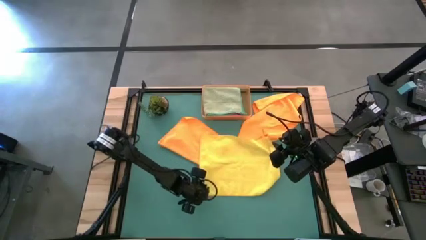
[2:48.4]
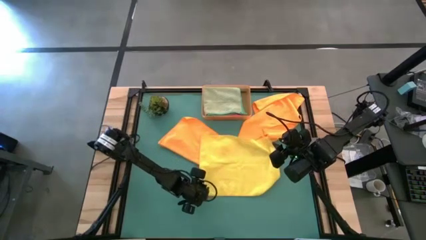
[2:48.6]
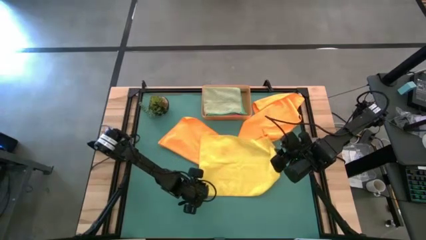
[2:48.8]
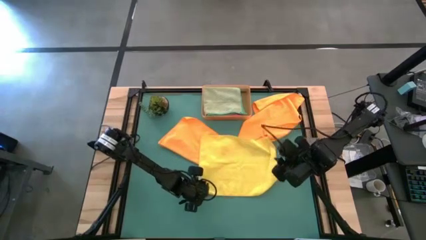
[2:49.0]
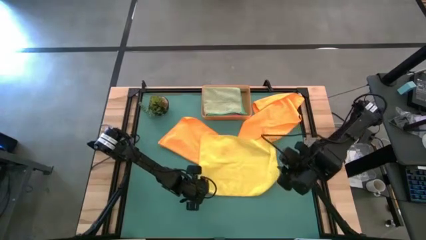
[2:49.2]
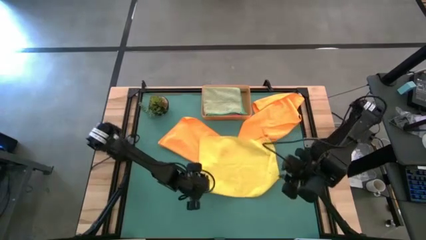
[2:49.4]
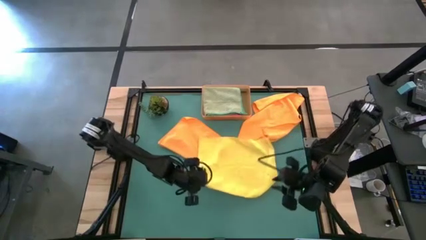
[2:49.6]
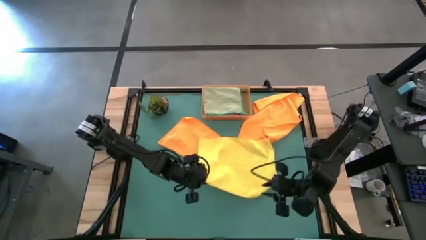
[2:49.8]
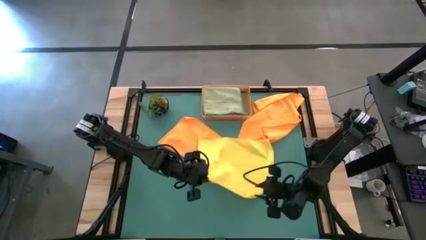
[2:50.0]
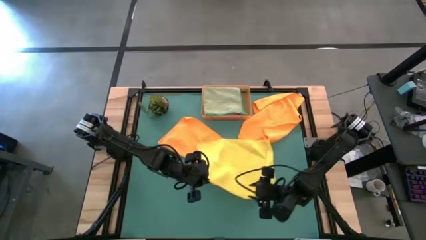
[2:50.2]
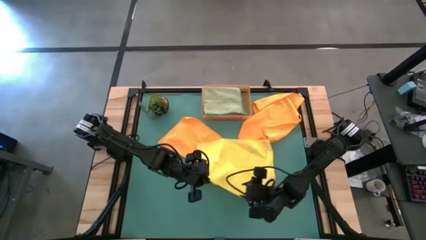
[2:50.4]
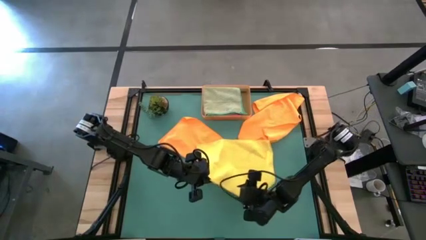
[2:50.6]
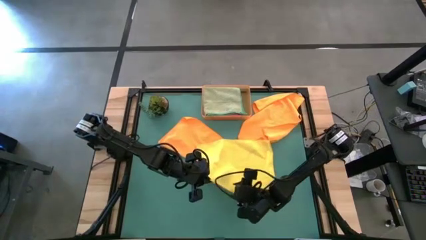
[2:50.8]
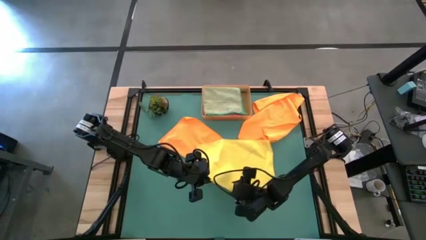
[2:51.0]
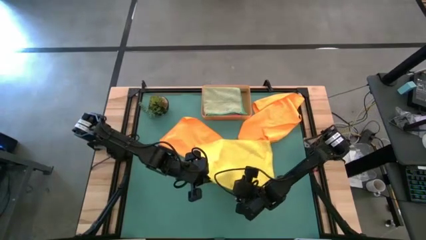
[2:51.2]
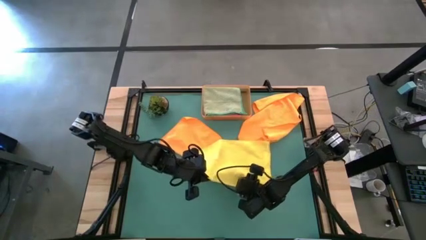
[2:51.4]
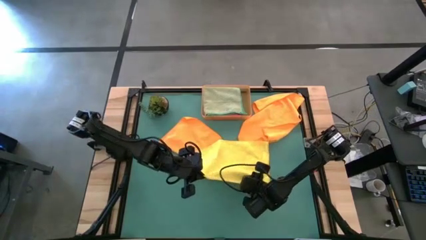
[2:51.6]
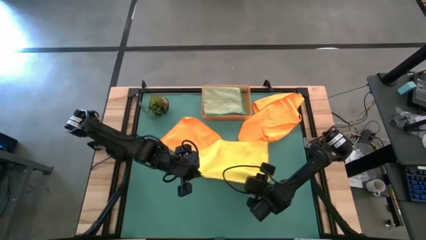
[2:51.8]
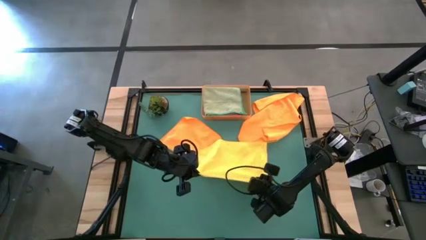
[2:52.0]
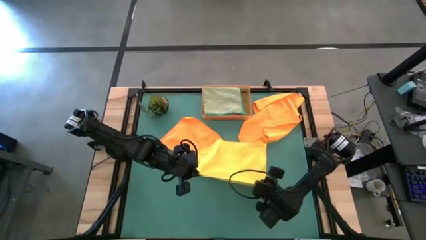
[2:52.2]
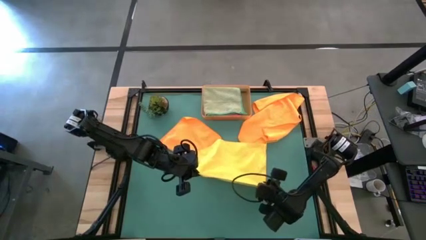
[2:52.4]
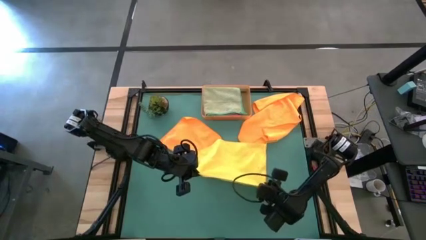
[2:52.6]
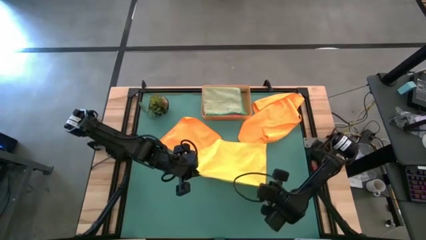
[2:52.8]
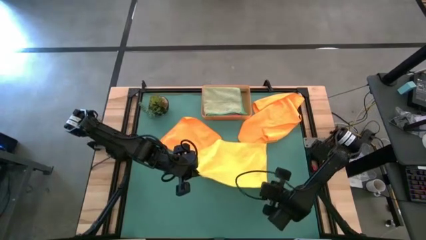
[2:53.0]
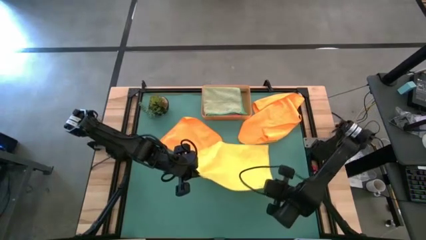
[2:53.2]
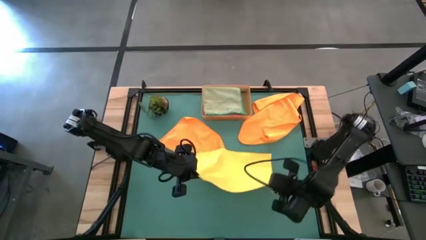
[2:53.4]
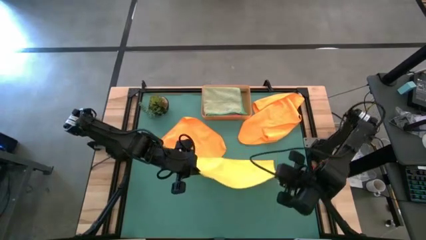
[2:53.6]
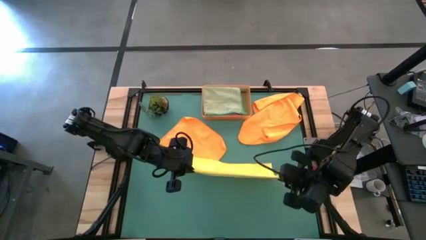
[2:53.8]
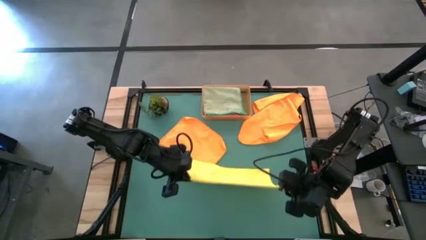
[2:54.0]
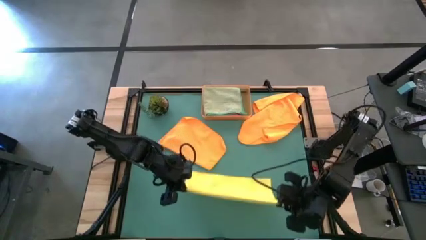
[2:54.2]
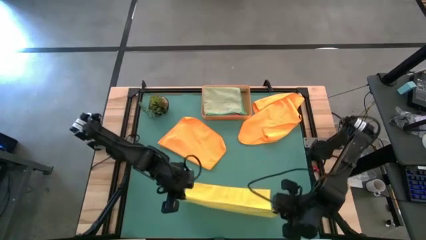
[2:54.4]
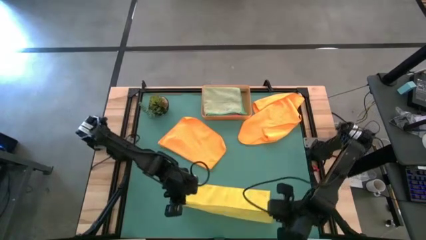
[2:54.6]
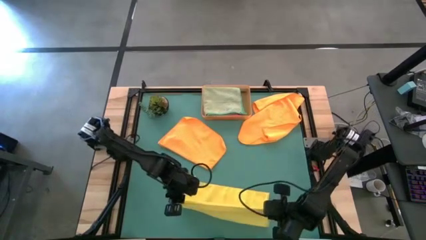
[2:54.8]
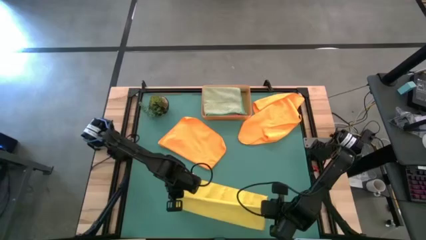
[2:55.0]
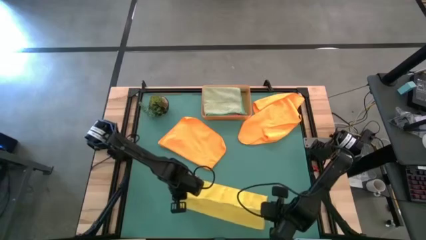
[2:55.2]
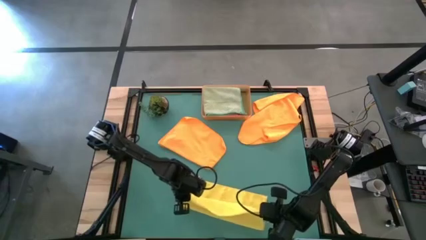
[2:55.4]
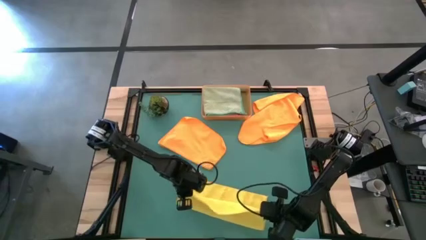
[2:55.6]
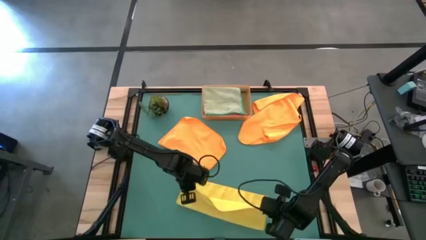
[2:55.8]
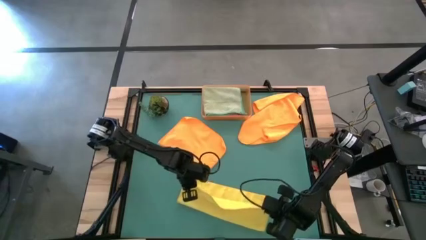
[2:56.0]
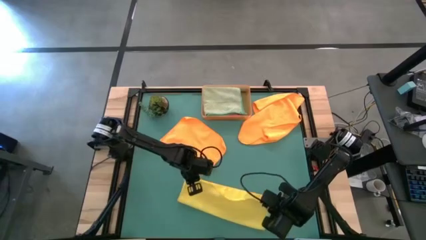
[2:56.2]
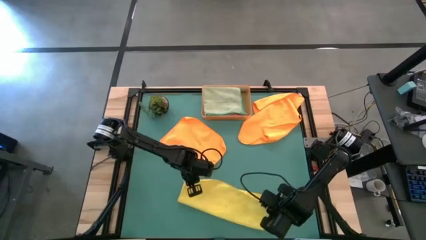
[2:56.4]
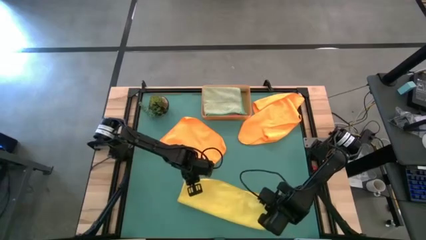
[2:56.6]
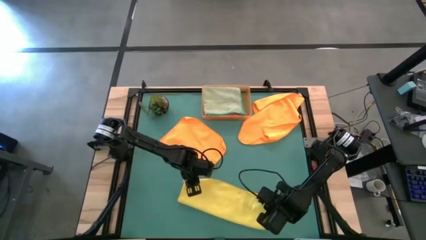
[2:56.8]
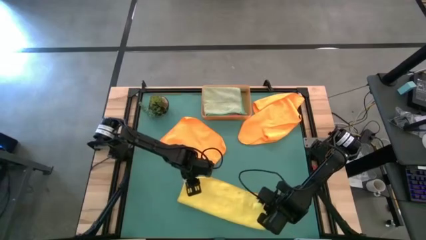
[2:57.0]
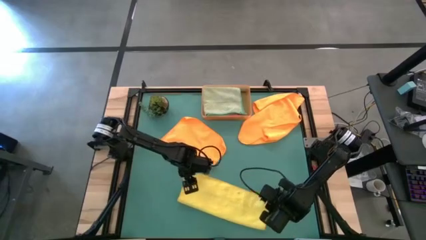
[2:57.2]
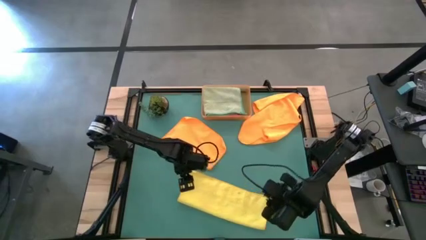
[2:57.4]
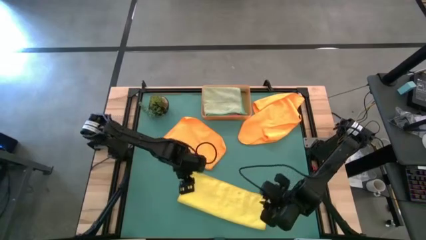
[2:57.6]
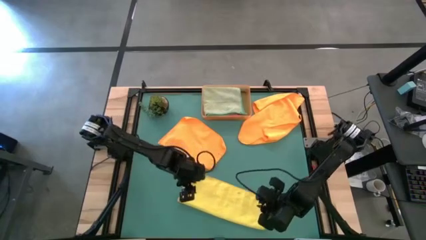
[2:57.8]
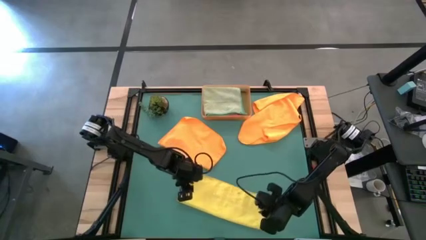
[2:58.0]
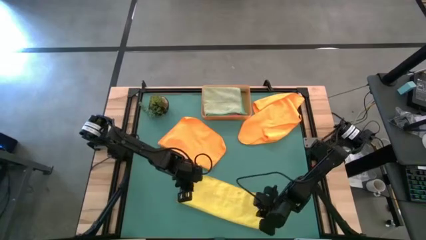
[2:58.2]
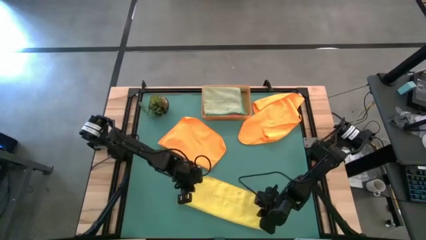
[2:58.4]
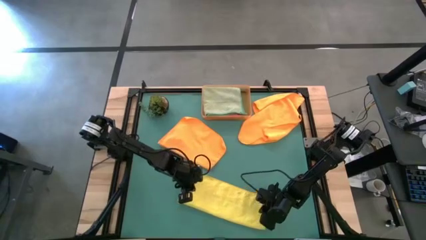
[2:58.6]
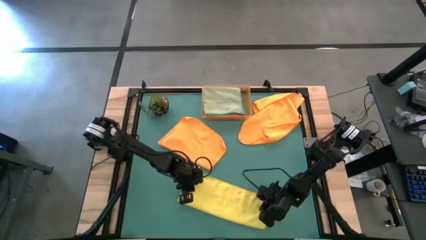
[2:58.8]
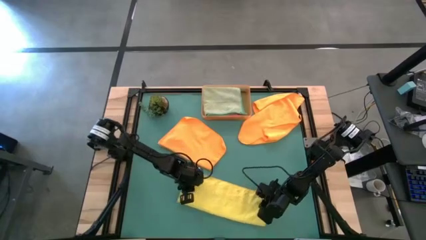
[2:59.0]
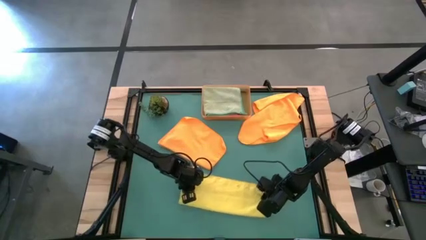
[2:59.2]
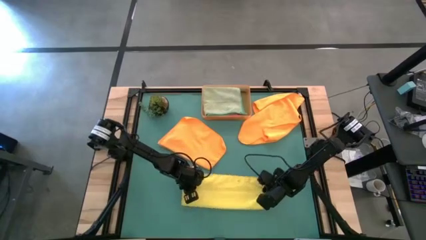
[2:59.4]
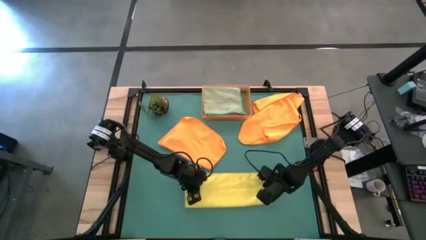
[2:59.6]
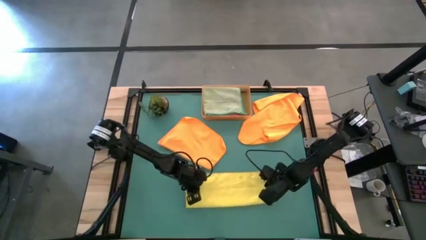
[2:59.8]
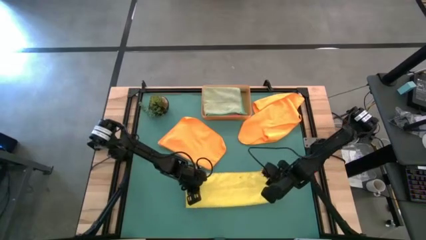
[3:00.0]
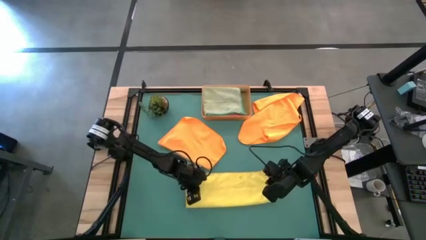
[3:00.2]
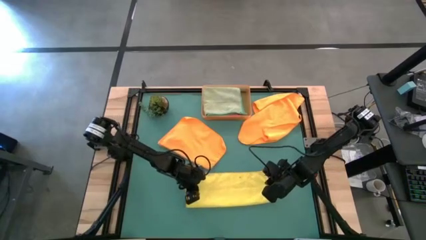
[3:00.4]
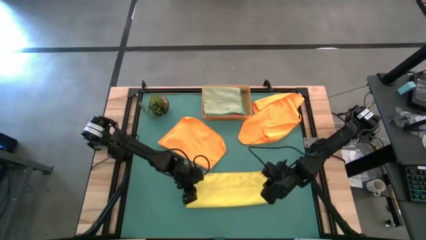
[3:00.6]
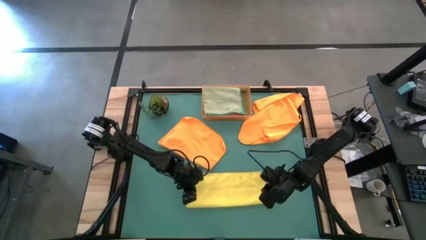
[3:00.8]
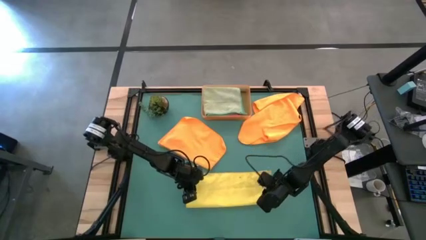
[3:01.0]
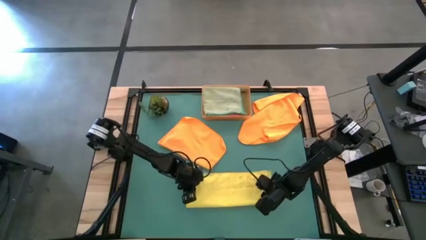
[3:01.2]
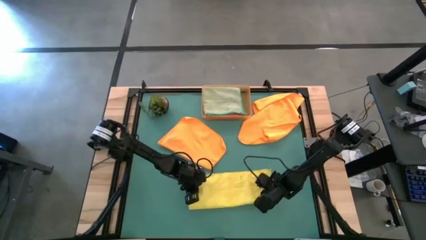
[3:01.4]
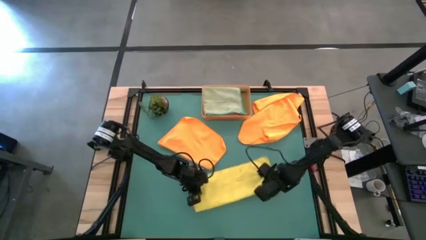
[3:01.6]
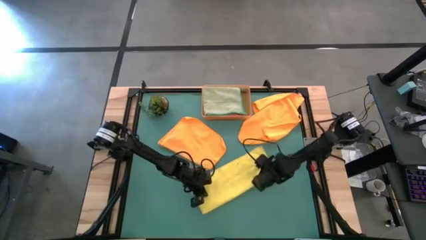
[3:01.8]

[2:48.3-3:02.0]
Task: Fold microfiber towels
Fold the yellow microfiber towel
